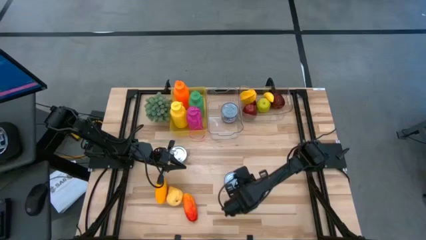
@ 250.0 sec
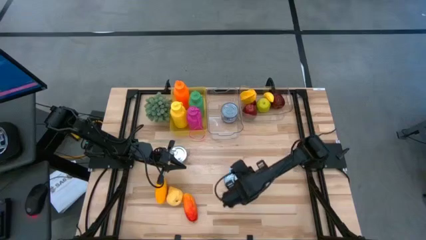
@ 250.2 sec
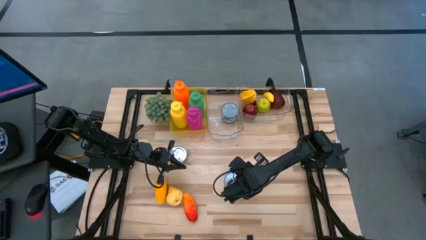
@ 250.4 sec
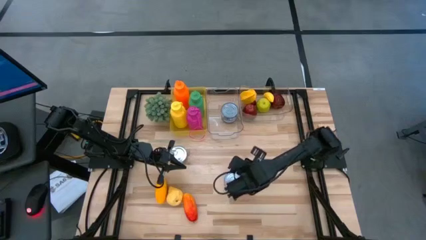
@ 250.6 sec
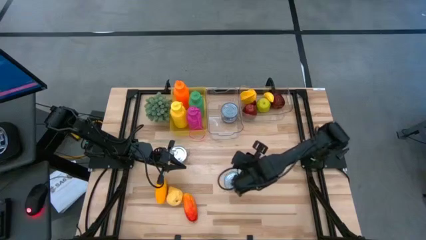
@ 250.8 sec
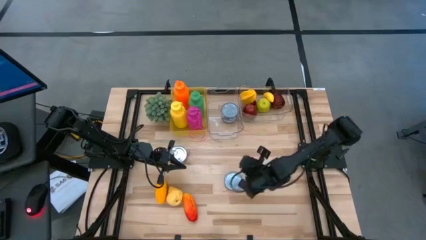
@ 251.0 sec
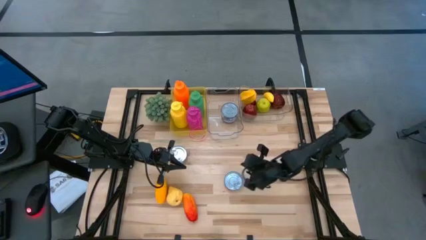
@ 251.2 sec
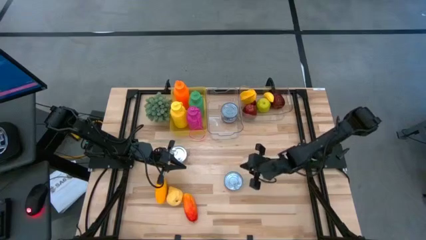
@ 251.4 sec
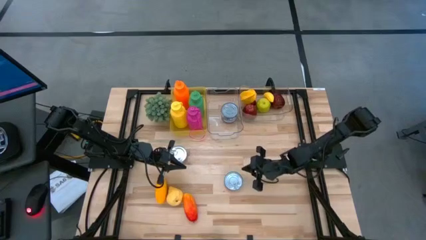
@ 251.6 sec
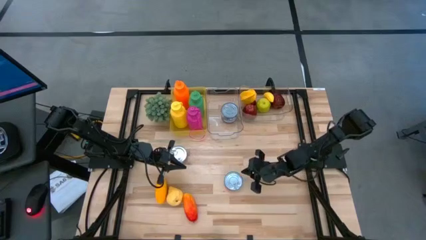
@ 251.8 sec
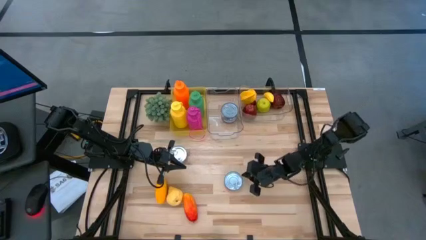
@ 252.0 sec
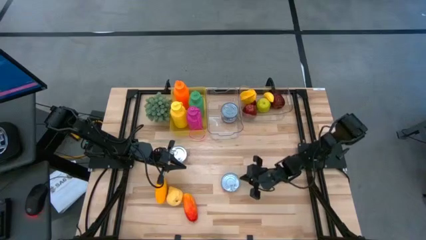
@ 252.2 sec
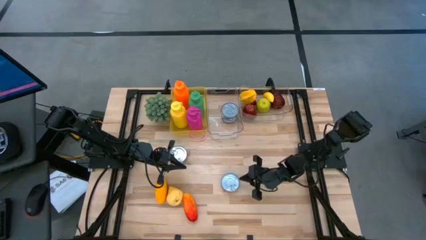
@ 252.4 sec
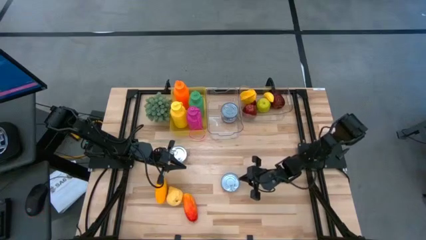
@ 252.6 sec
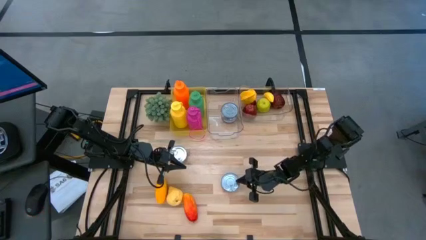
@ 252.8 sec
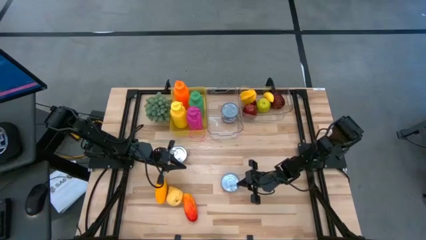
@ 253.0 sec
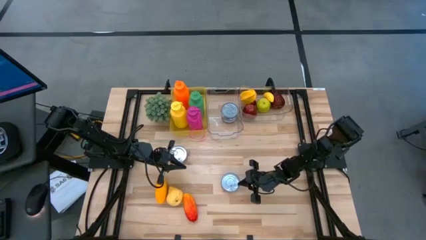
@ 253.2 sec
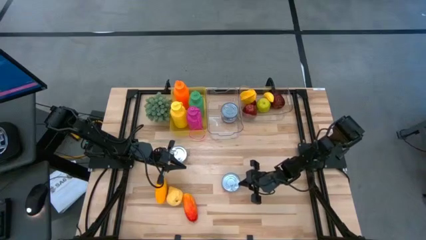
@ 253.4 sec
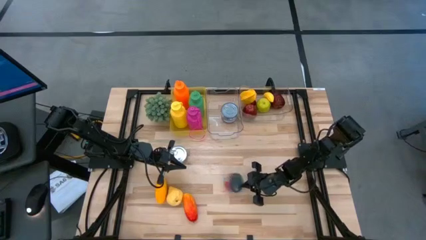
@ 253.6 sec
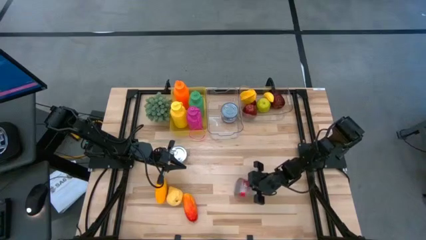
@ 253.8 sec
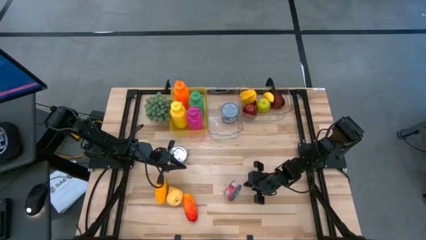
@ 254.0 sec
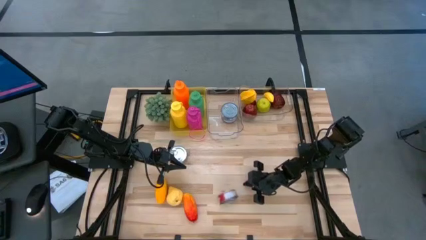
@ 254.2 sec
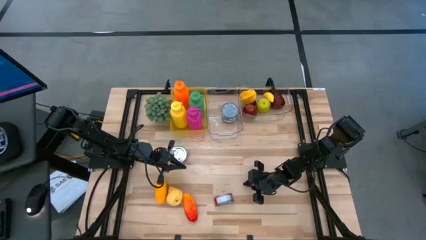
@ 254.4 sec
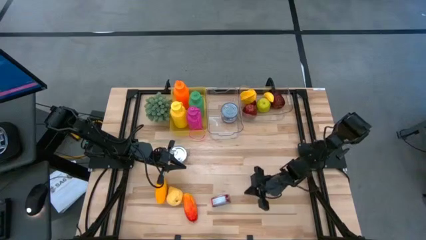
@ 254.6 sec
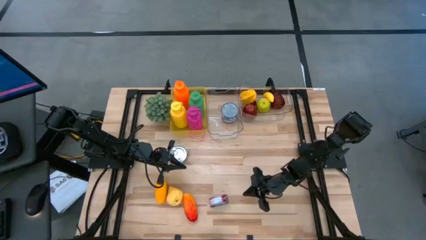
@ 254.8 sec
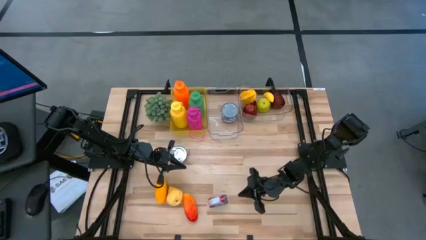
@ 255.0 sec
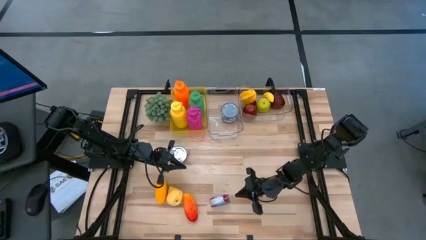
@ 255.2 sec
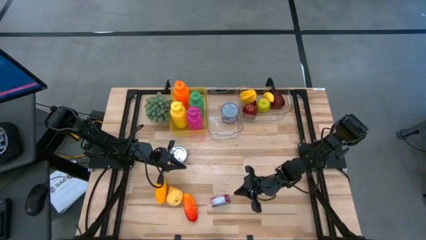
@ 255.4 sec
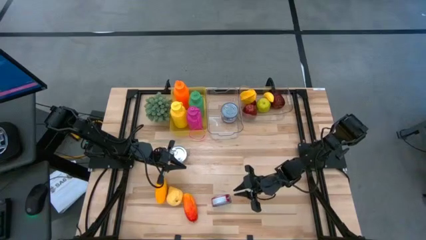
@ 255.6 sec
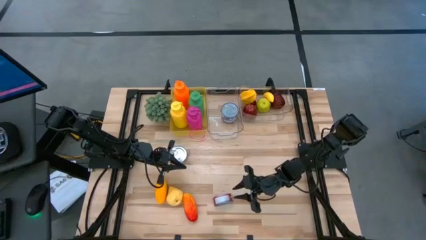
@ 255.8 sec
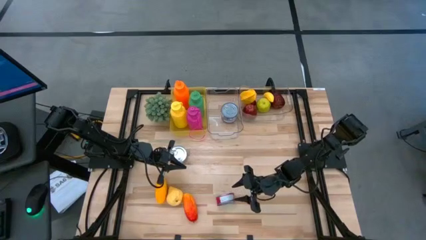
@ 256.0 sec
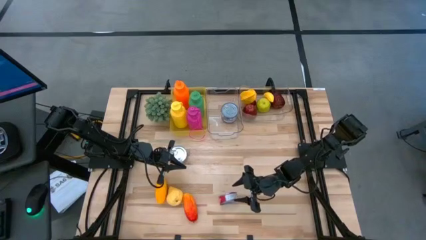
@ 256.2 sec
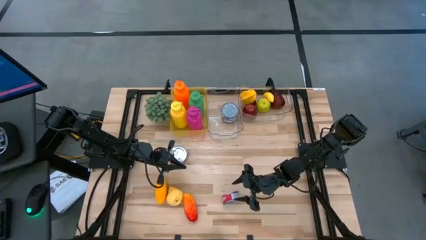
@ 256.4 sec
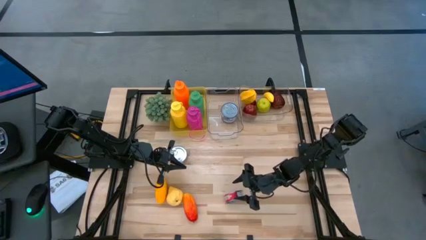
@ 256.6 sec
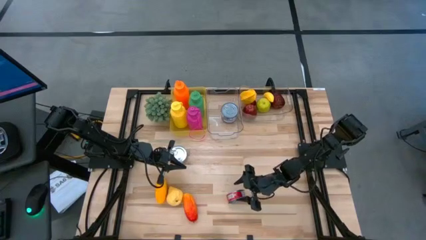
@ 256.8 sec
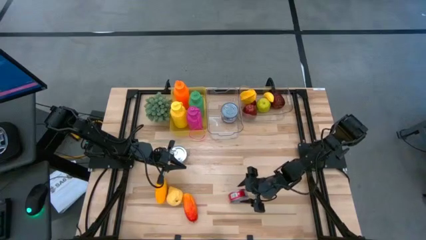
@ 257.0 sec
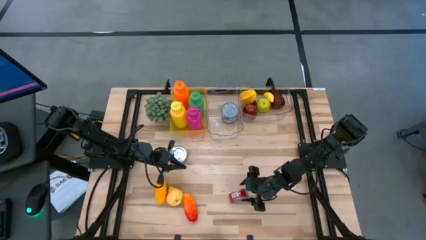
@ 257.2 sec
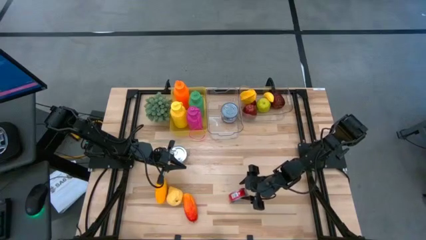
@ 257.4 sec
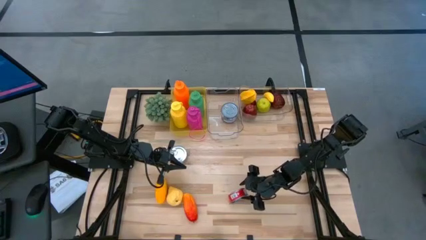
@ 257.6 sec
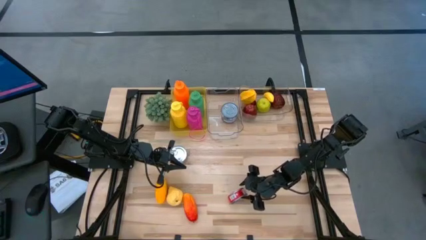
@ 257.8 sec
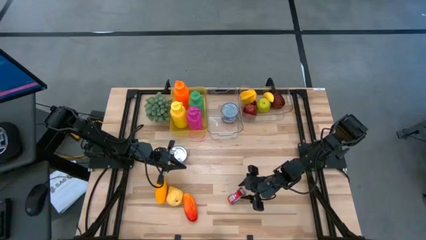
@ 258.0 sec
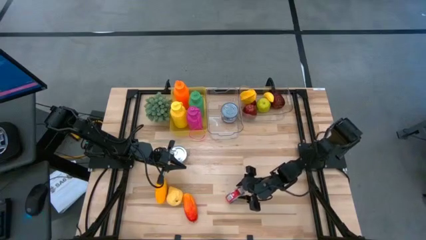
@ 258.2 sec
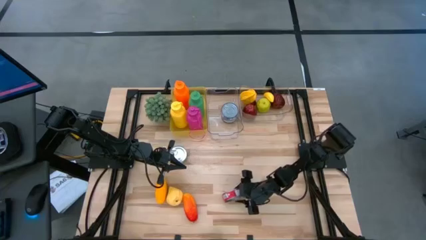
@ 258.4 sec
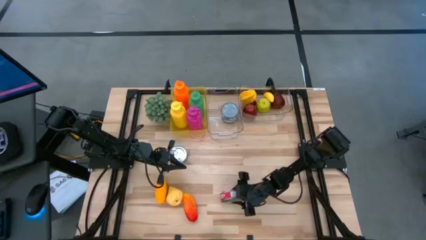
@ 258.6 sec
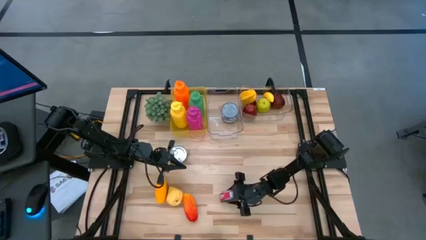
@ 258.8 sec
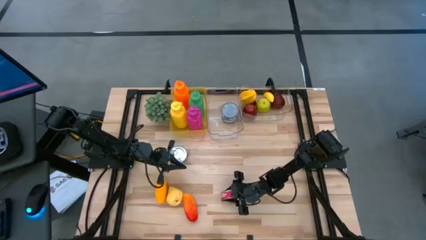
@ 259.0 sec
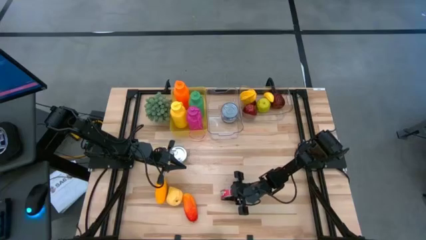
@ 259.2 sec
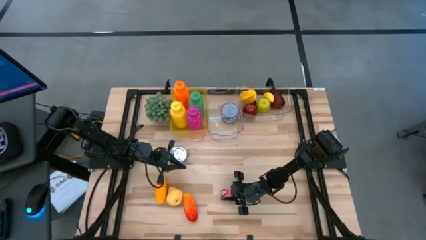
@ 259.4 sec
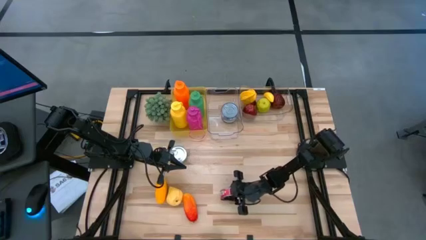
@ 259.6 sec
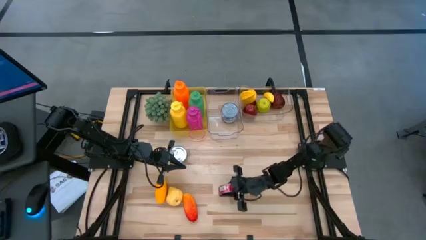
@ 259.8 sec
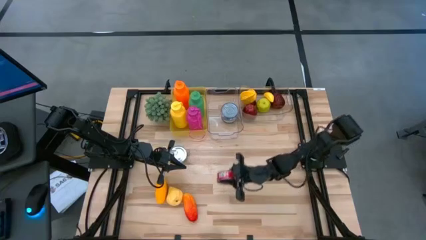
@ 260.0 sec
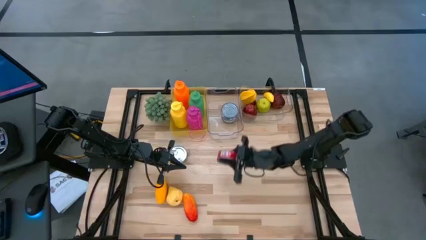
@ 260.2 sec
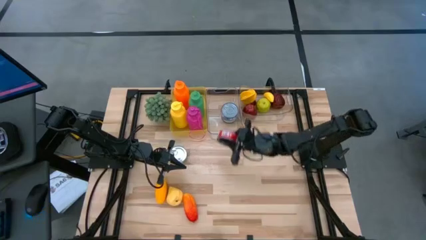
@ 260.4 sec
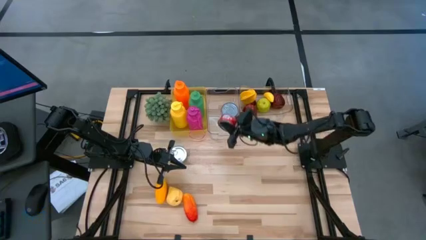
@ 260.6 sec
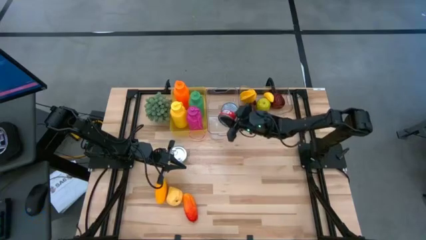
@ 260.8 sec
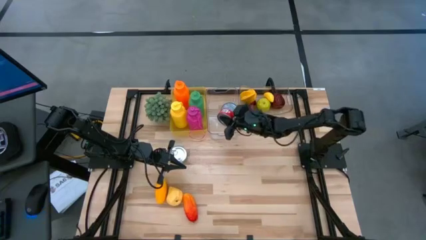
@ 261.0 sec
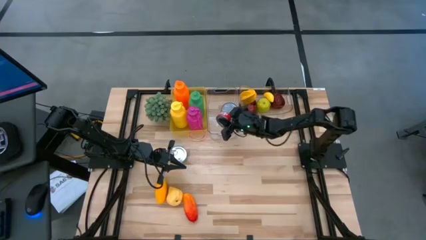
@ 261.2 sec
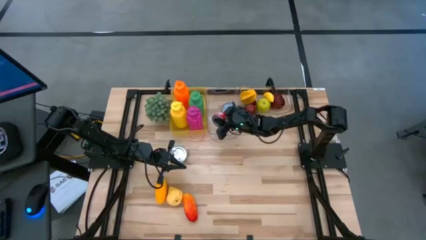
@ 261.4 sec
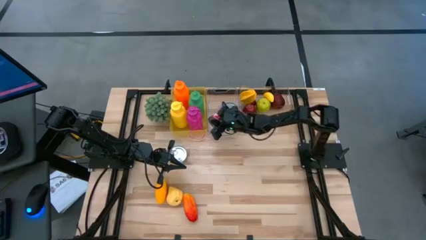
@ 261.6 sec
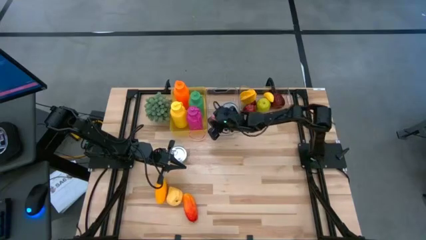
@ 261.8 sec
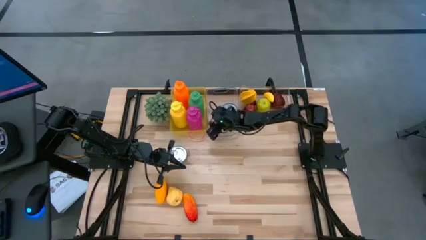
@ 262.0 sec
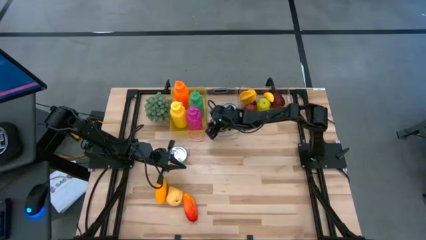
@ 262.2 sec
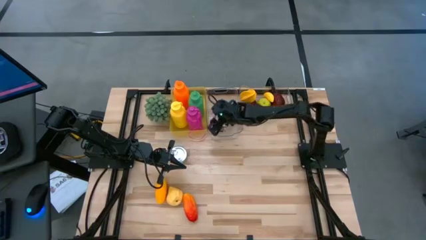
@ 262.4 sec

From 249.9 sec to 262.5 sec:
Task: Pick & Place Food Item
Put the red tuna into the left transparent bin
